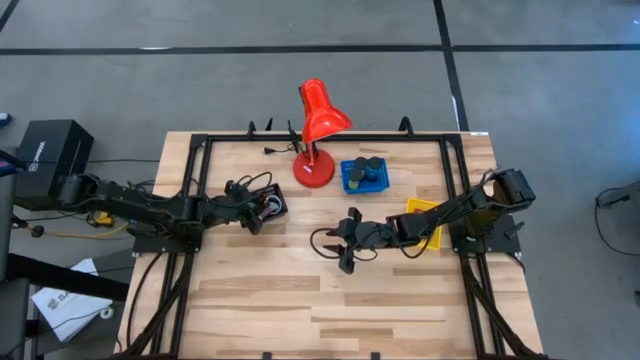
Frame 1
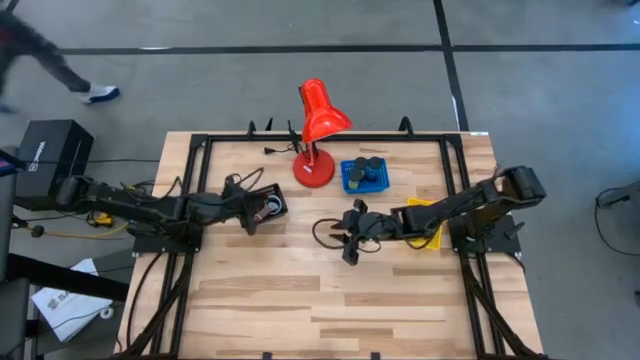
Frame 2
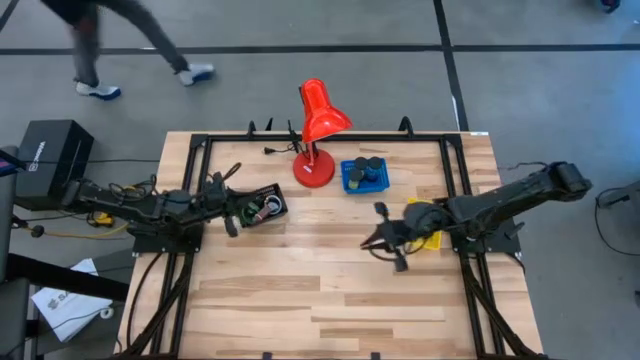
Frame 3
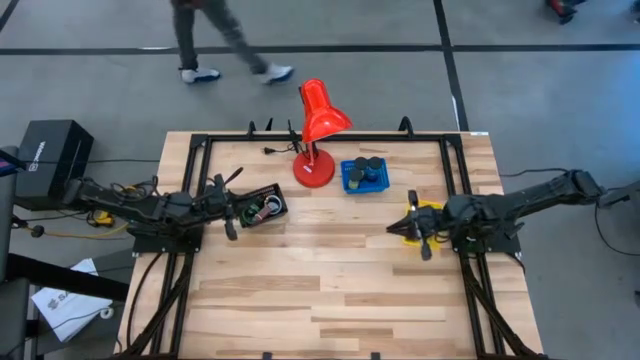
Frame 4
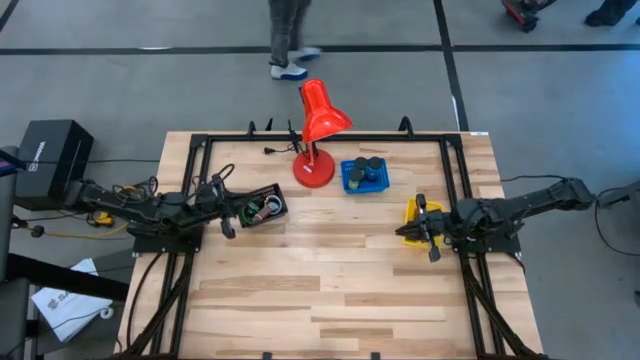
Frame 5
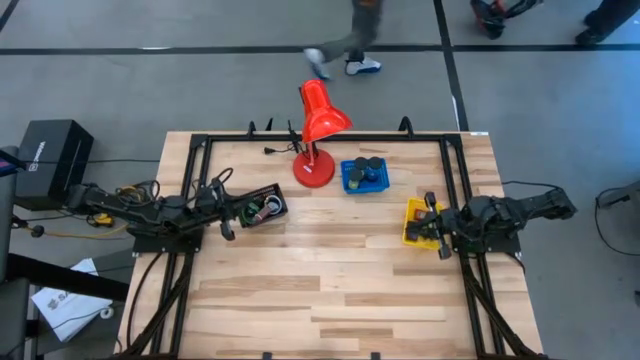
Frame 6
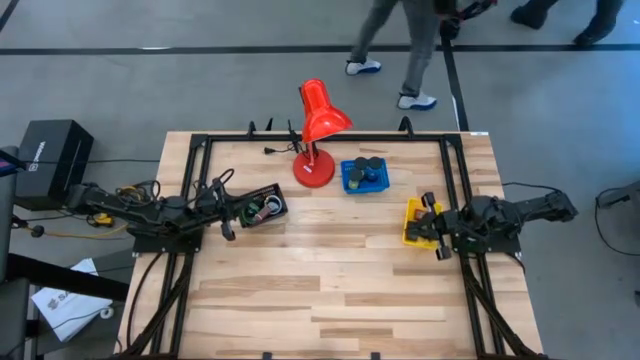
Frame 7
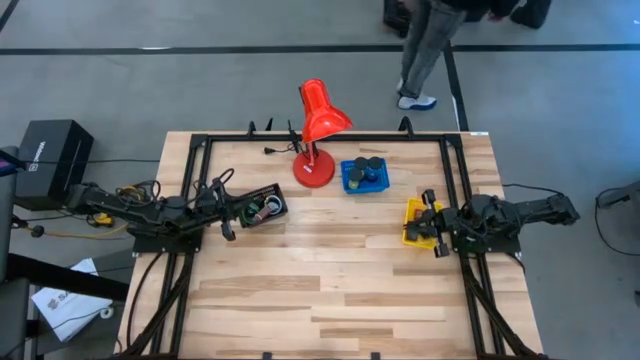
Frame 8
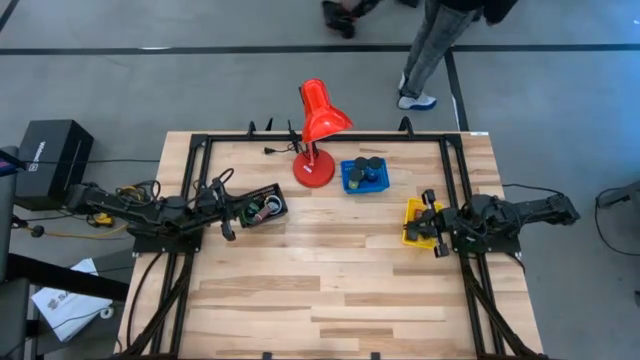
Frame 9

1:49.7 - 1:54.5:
Task: Pick & Place Office items
Return to Home Position

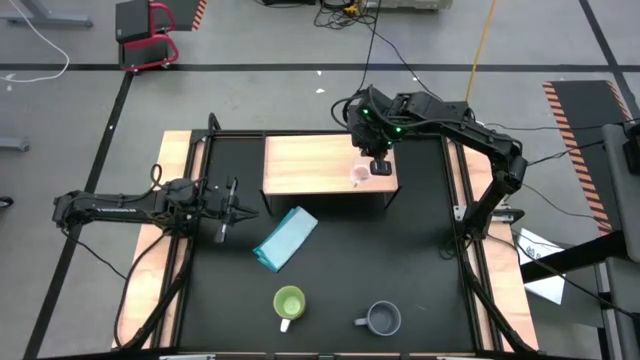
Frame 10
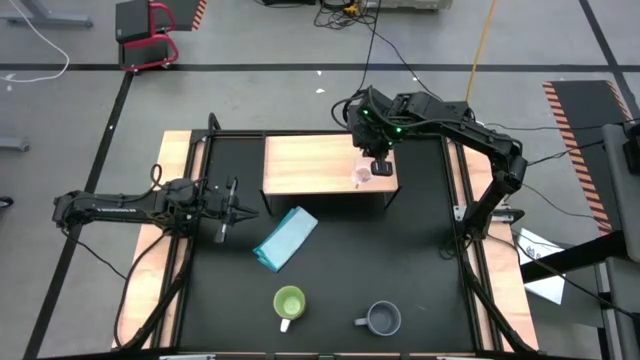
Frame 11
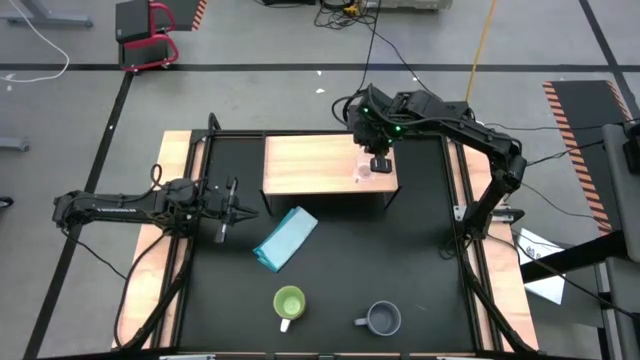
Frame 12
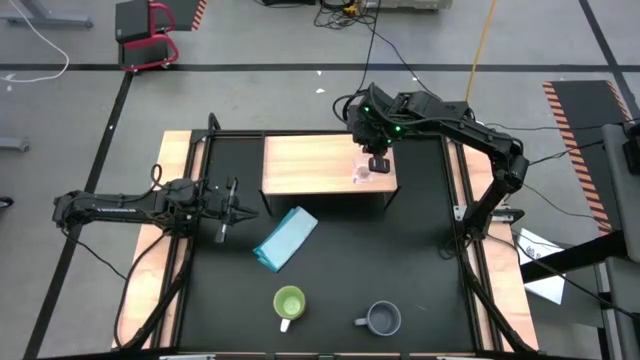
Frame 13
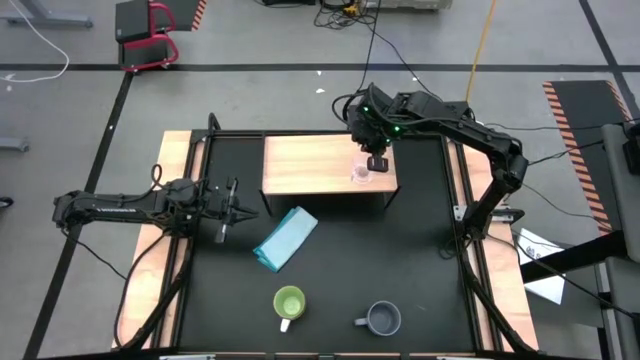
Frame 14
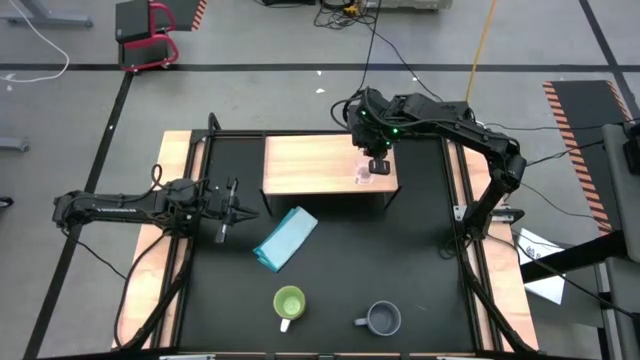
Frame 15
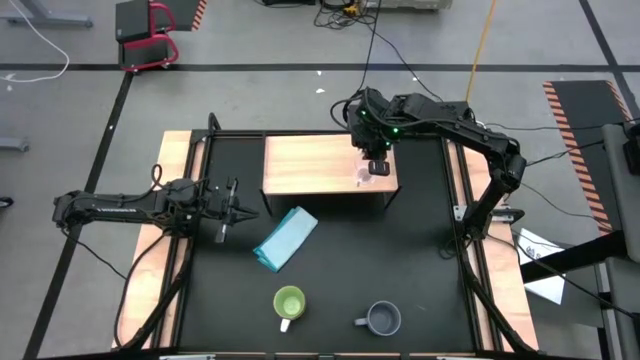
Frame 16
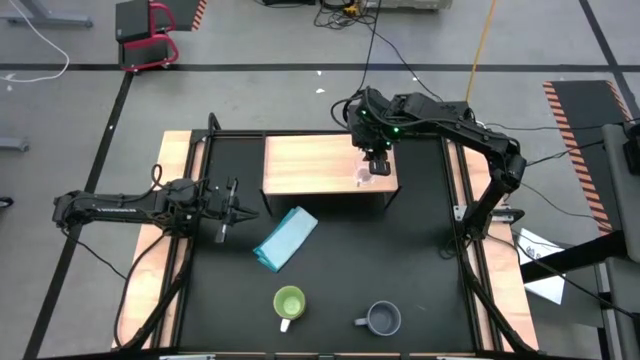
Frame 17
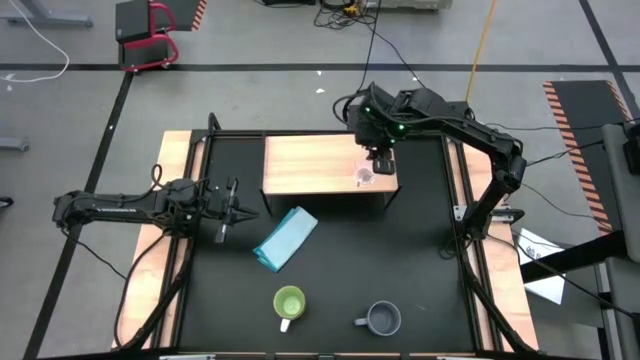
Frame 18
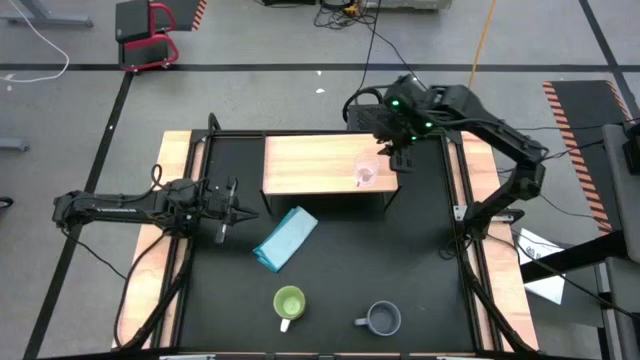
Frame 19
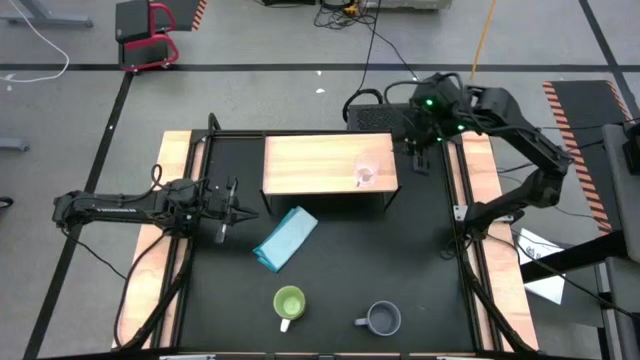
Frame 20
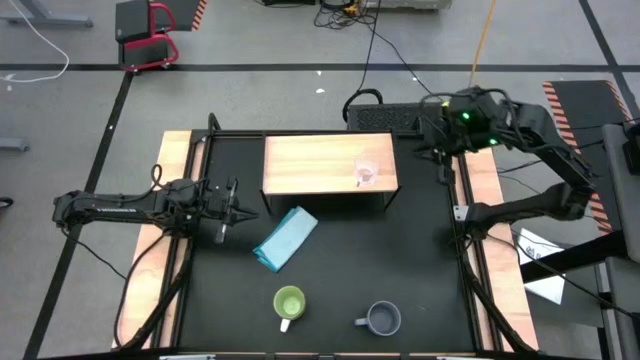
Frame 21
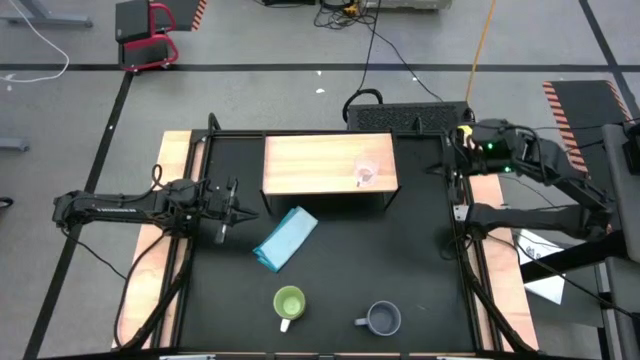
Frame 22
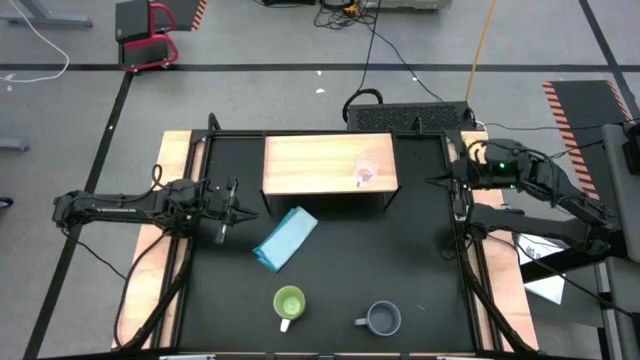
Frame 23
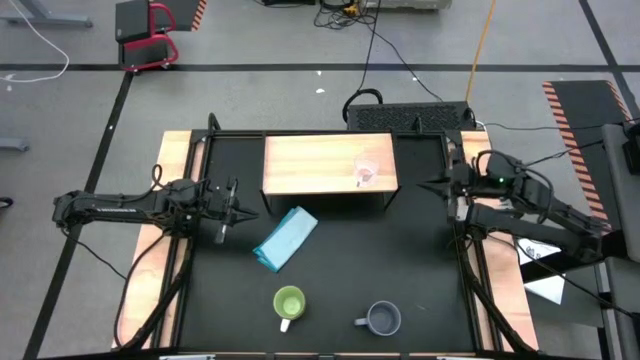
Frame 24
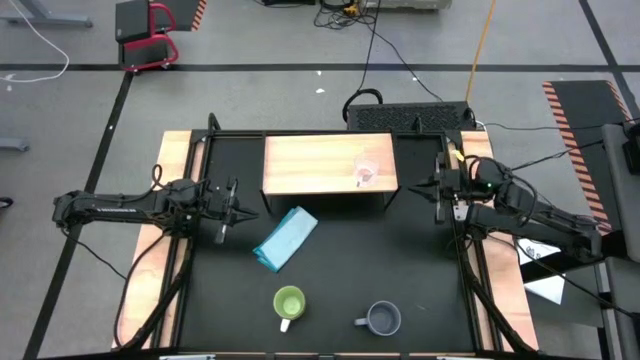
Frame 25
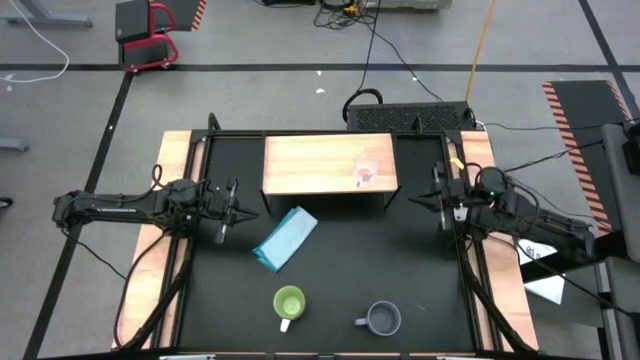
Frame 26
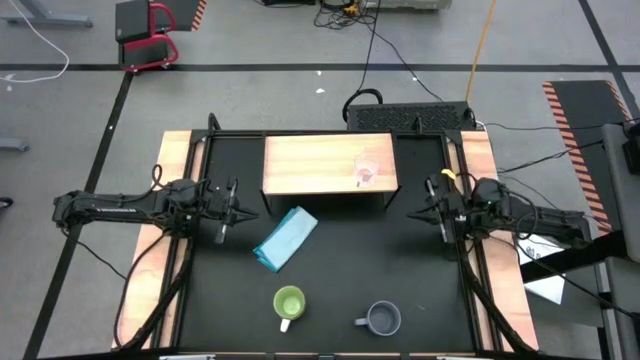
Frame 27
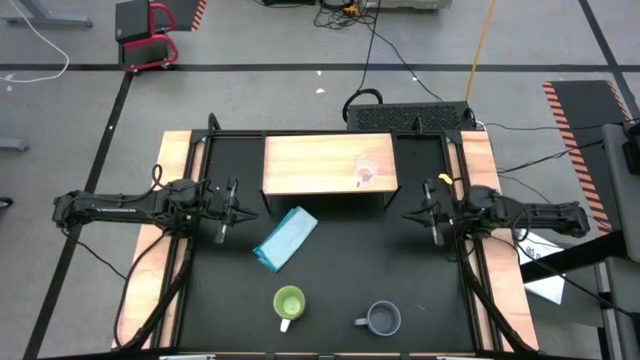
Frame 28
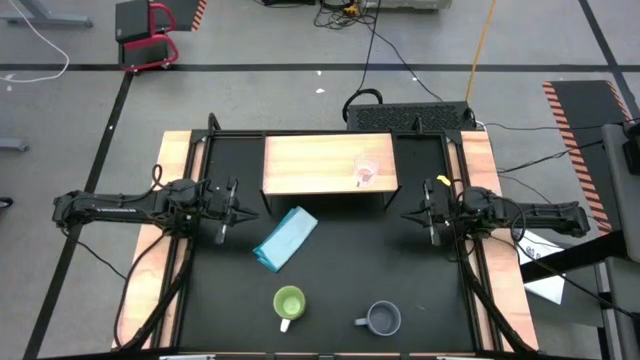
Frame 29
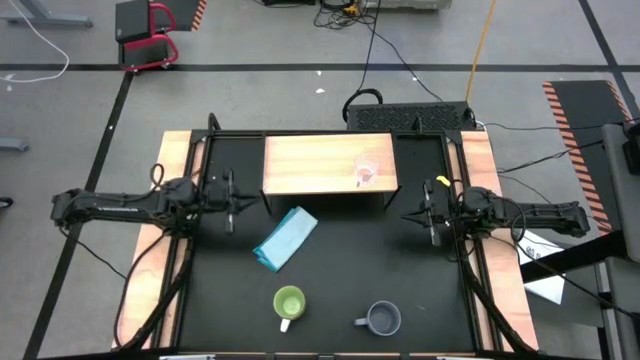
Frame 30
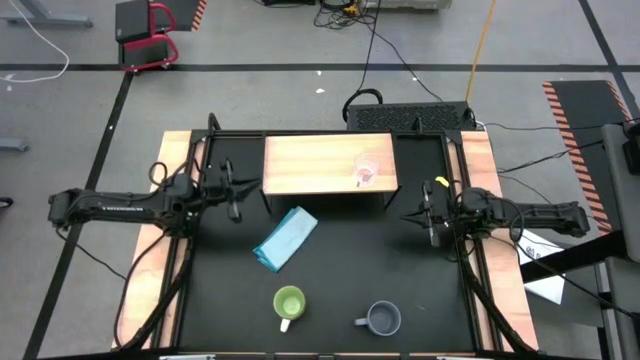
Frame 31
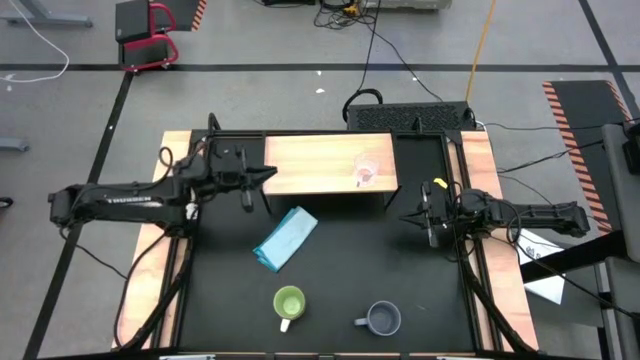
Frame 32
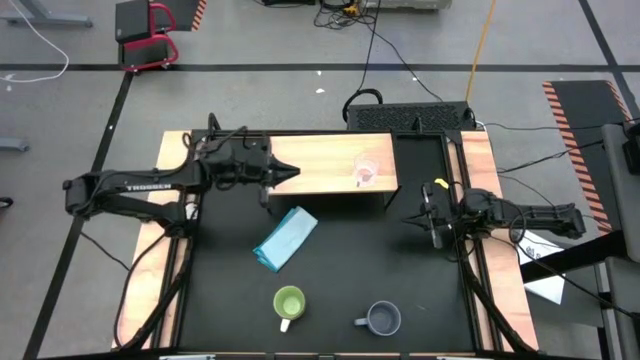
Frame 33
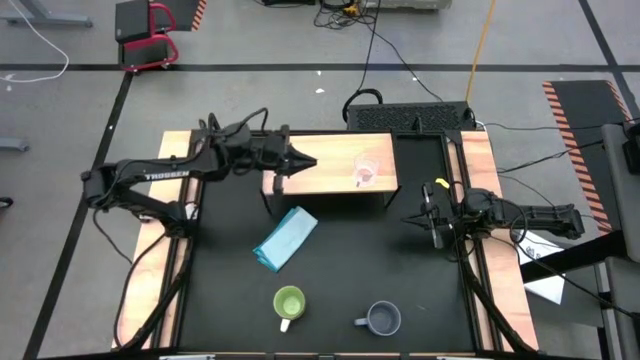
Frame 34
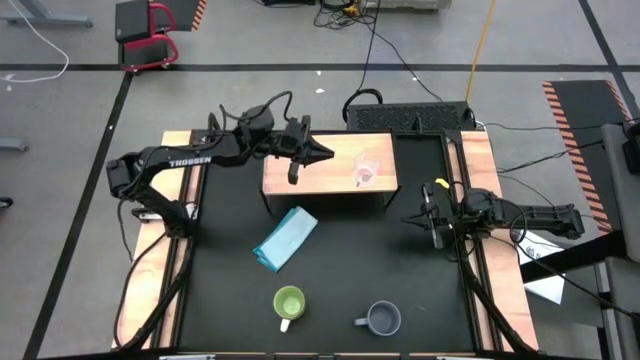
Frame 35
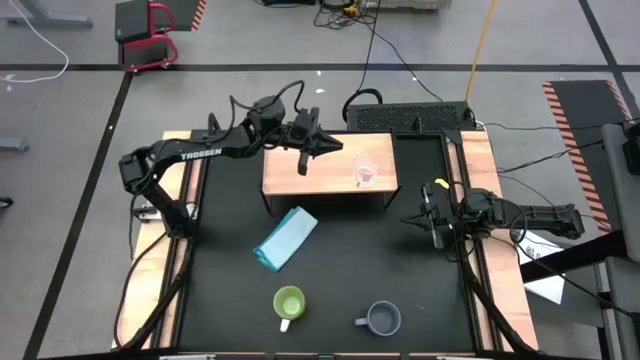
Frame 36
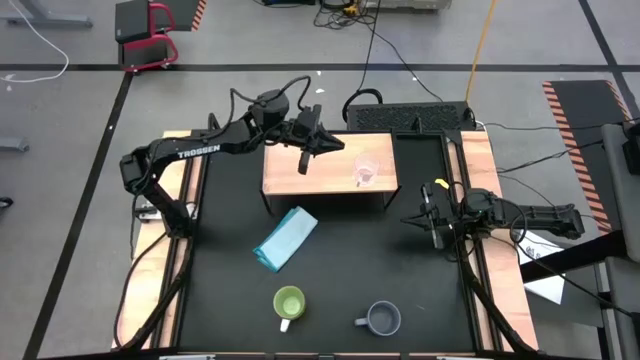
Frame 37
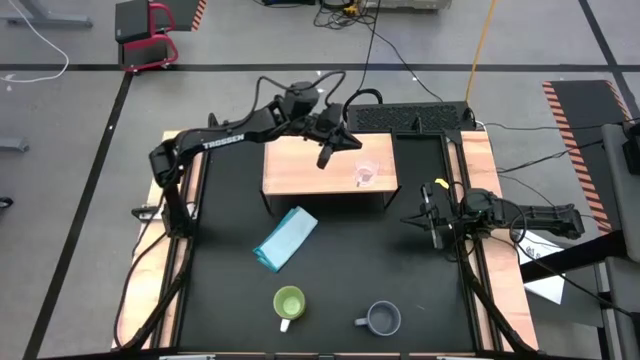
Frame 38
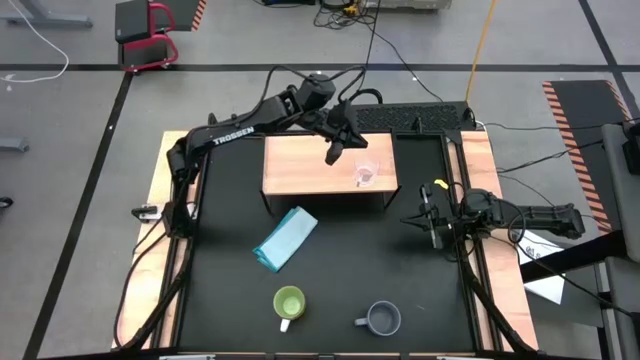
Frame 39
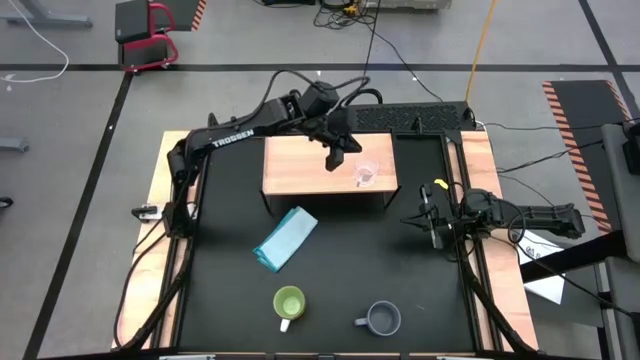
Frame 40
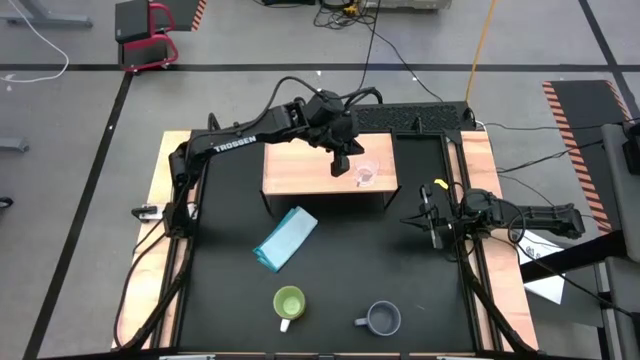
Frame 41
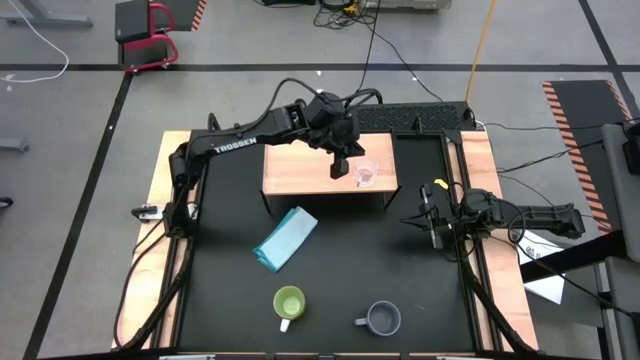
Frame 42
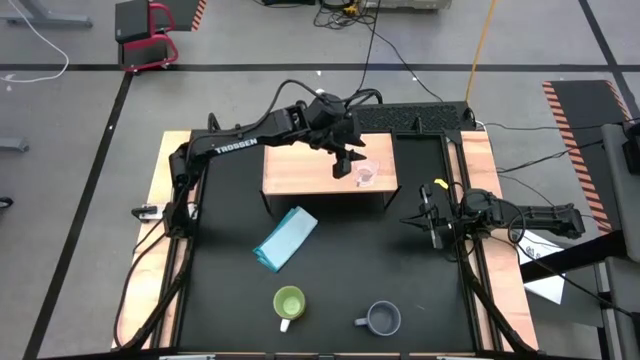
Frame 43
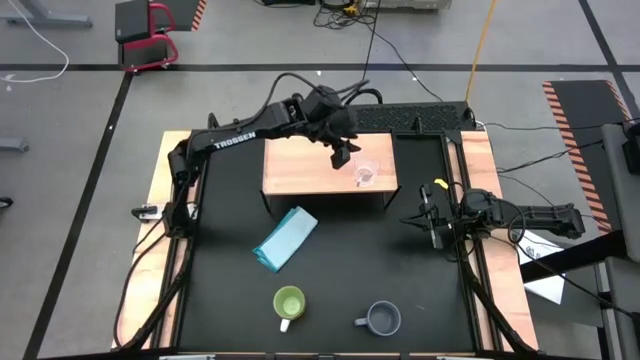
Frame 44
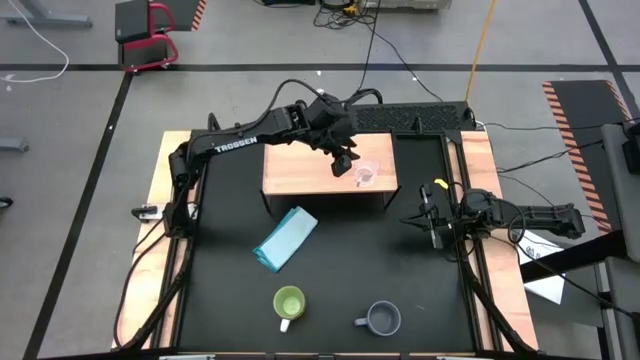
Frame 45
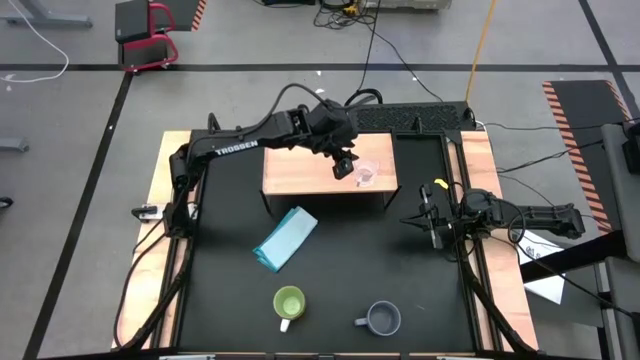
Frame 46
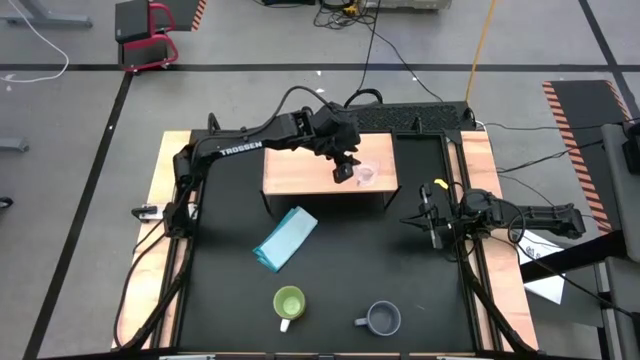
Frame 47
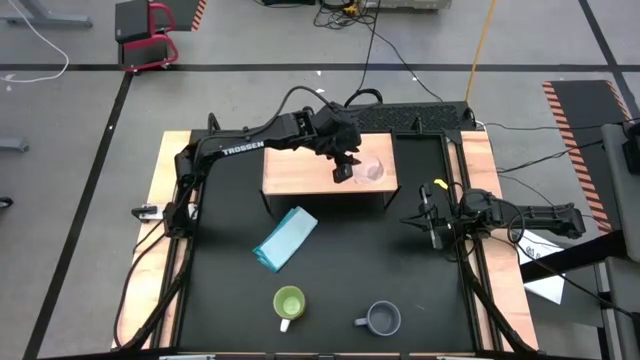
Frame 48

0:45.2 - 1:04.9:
Task: Stack small to large cups/mugs on shelf
Put the transparent mug on the shelf
